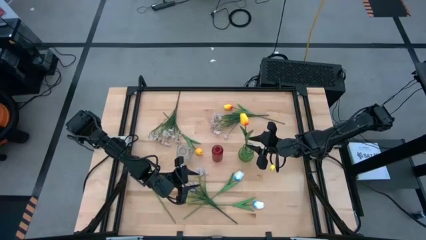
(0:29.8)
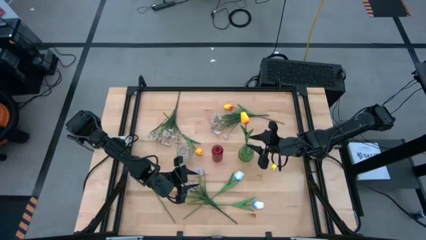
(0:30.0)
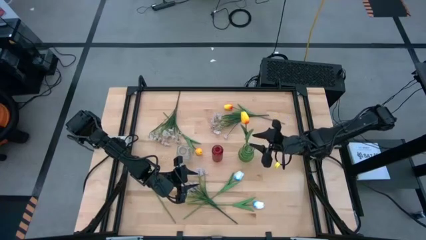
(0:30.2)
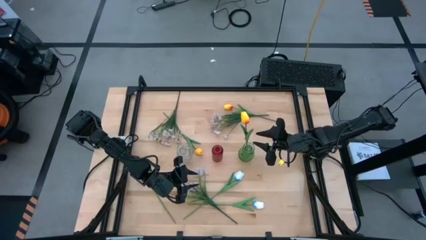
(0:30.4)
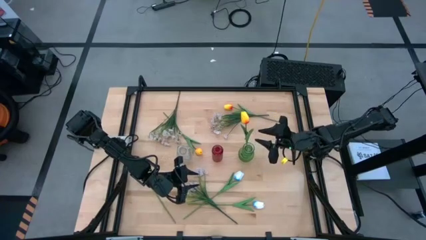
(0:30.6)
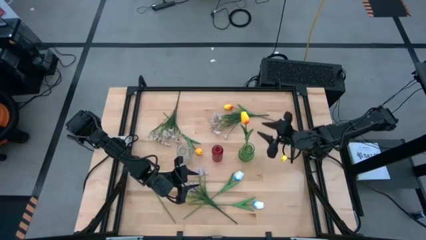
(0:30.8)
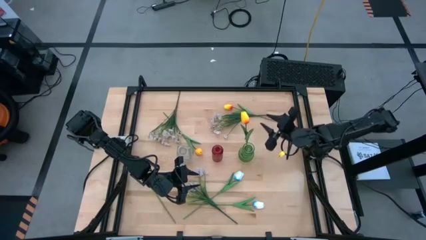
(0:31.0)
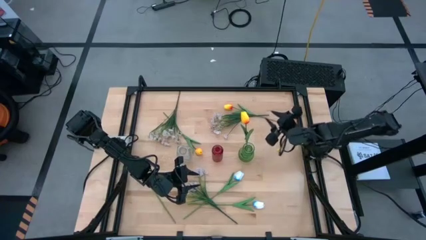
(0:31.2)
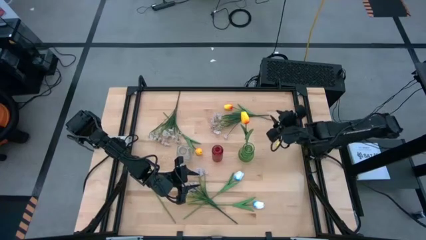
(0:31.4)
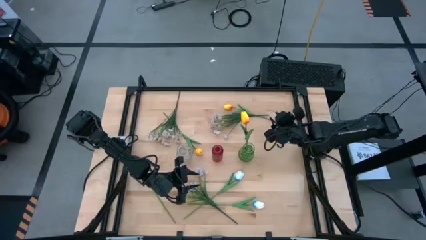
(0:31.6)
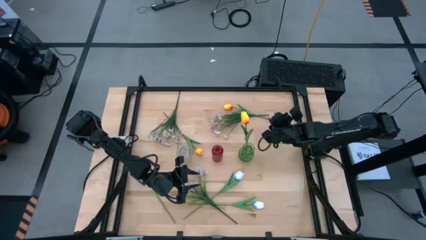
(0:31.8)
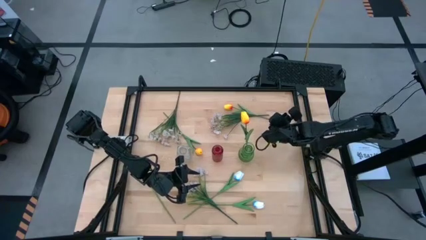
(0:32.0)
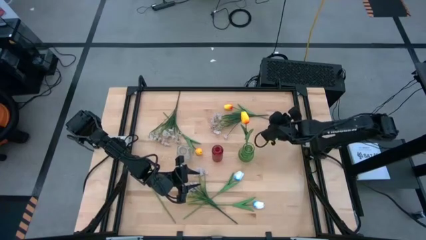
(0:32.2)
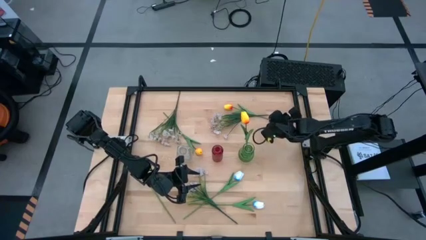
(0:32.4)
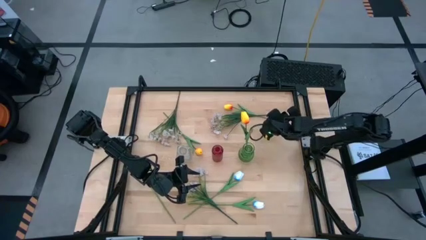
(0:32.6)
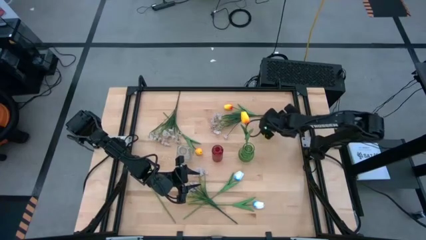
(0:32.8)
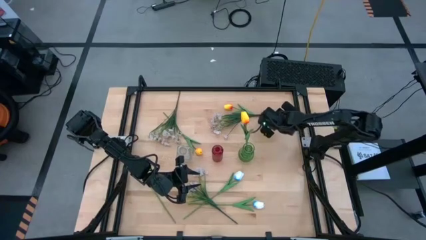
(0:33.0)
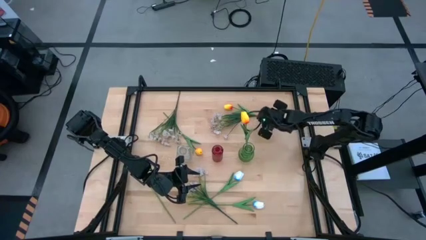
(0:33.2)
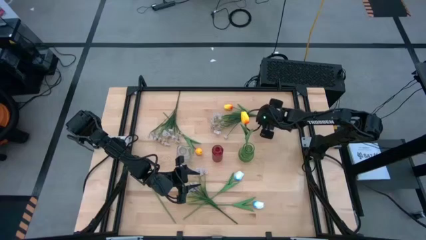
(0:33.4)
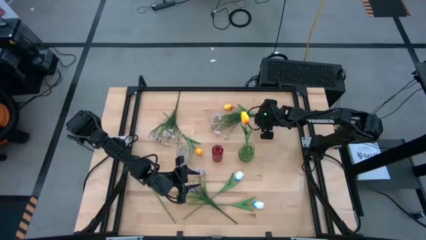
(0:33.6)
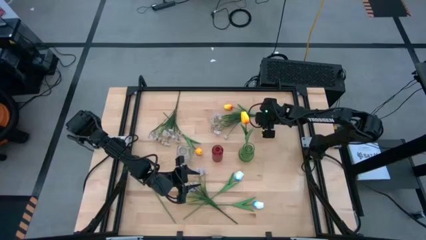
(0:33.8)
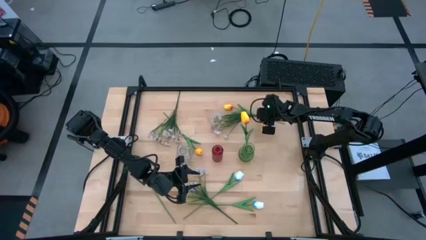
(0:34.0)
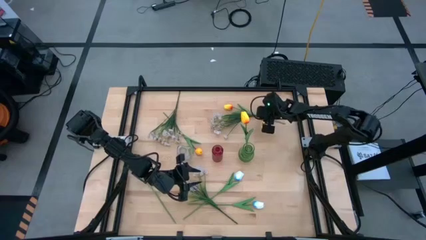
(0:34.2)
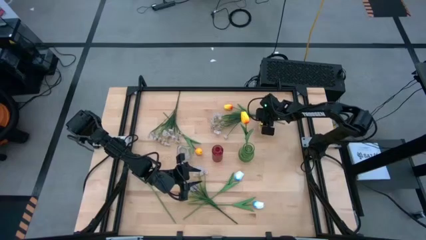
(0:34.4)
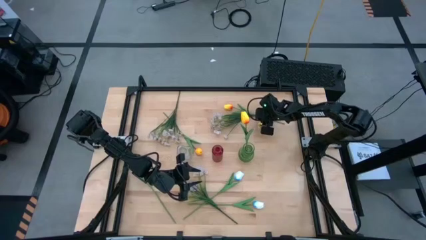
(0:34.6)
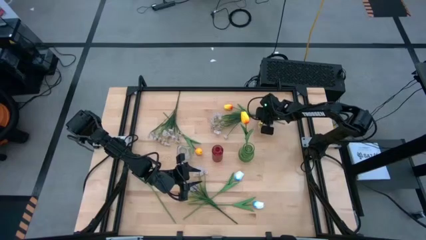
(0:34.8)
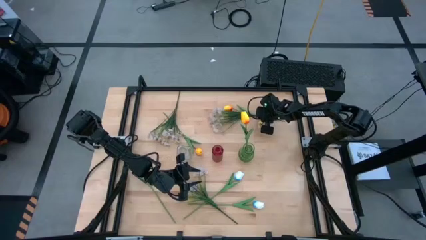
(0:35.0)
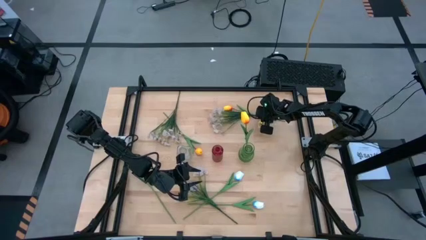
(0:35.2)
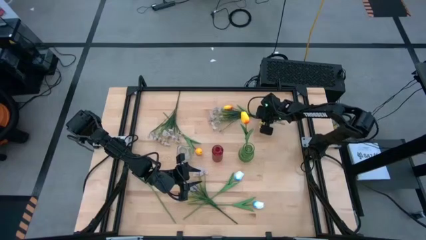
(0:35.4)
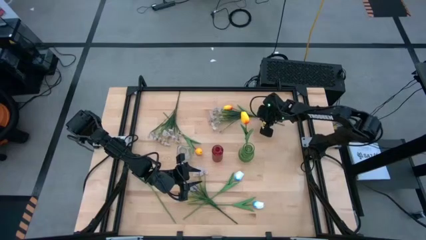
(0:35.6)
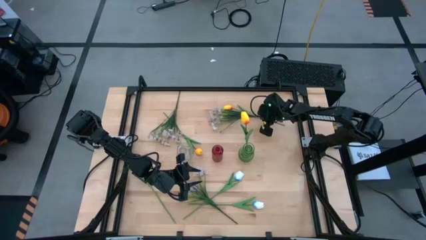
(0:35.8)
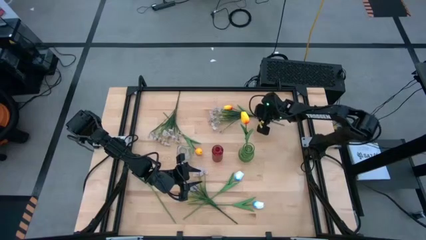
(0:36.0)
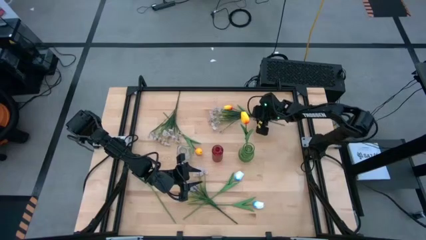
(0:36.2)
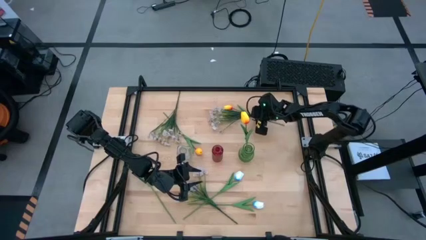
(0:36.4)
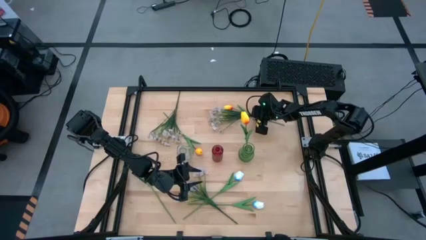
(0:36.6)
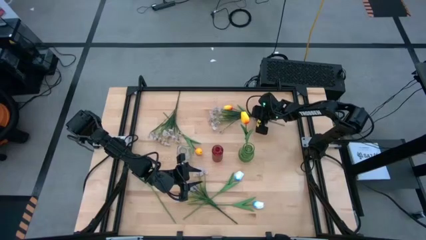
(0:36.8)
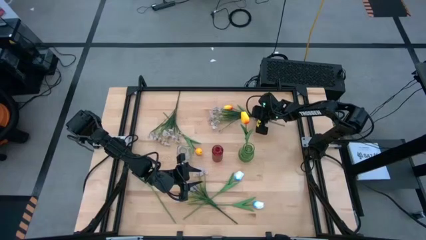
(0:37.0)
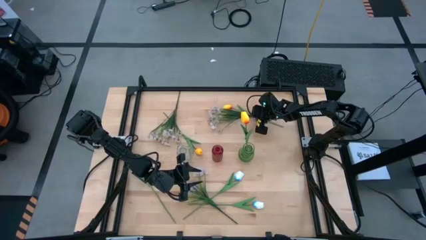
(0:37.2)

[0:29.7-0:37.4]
Task: Sort flowers into vase by color
Put the top right white flowers into the red vase

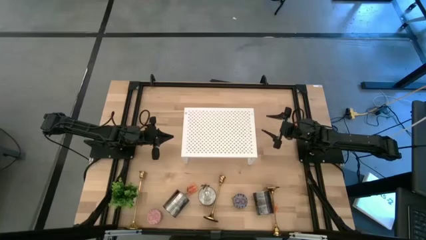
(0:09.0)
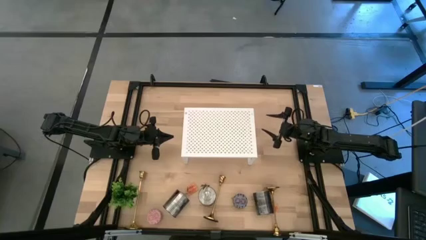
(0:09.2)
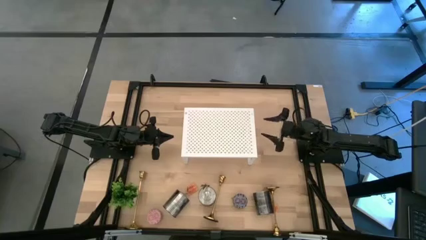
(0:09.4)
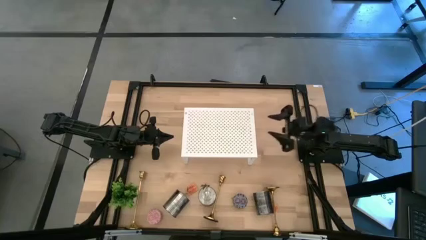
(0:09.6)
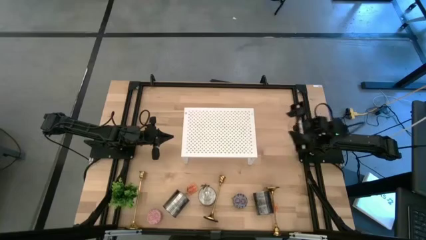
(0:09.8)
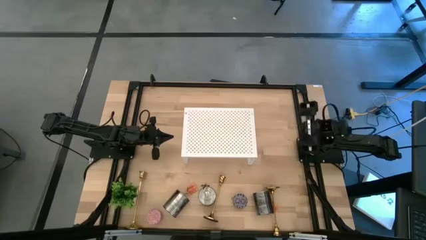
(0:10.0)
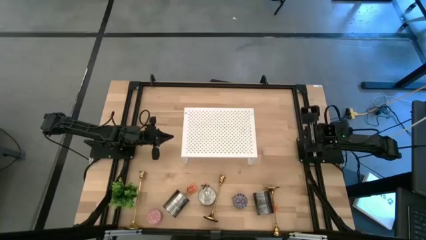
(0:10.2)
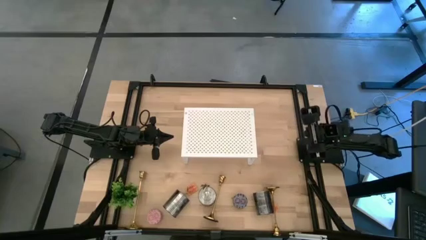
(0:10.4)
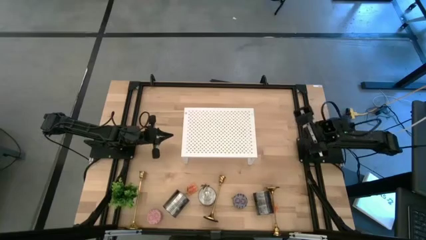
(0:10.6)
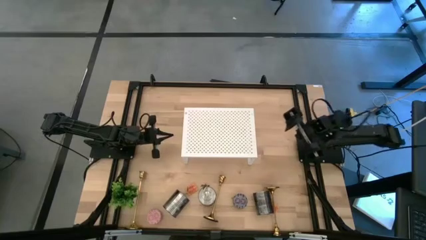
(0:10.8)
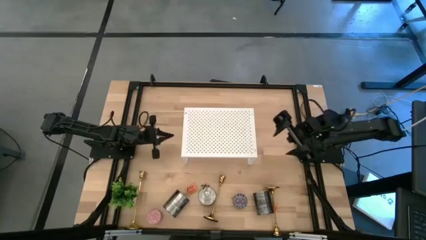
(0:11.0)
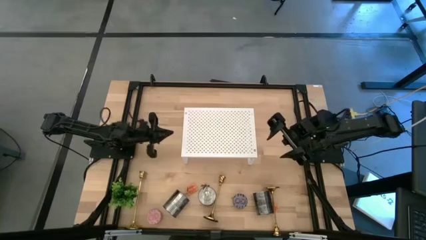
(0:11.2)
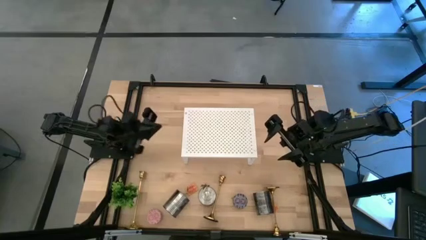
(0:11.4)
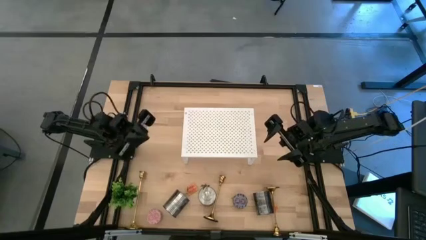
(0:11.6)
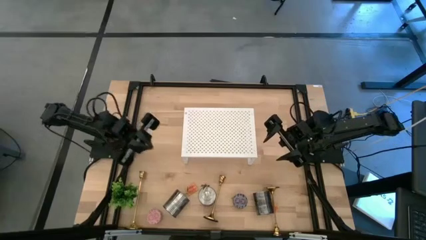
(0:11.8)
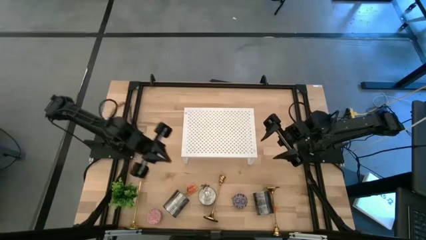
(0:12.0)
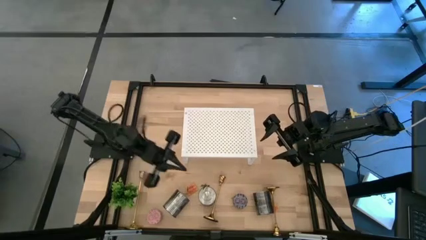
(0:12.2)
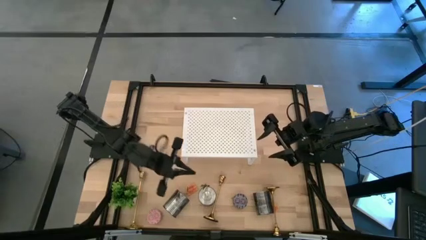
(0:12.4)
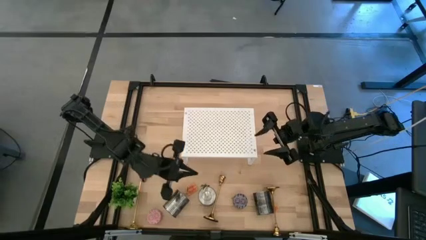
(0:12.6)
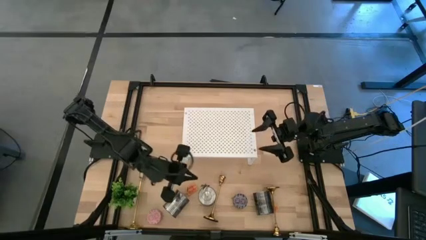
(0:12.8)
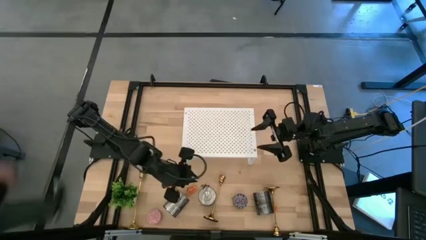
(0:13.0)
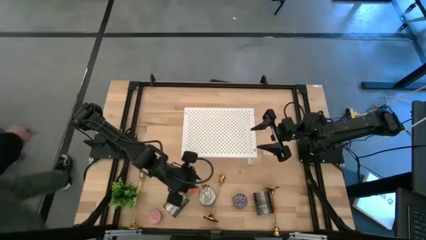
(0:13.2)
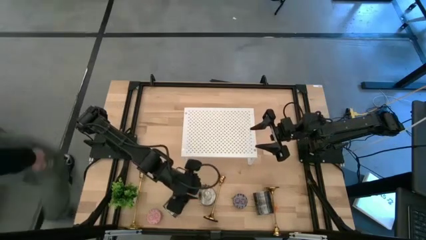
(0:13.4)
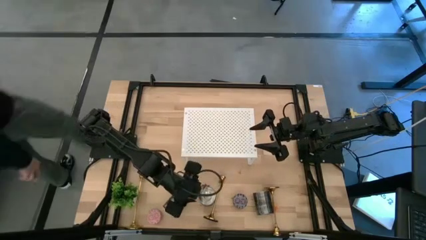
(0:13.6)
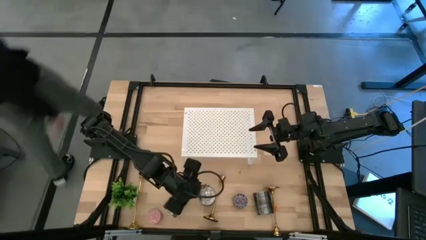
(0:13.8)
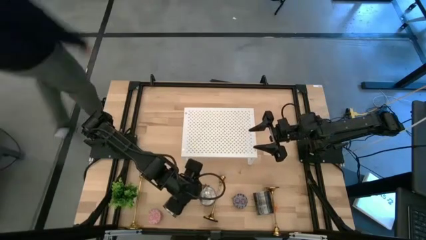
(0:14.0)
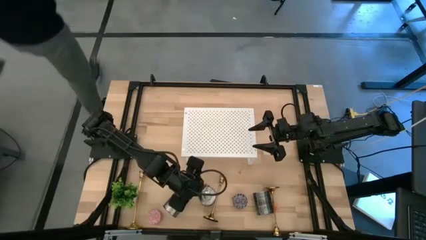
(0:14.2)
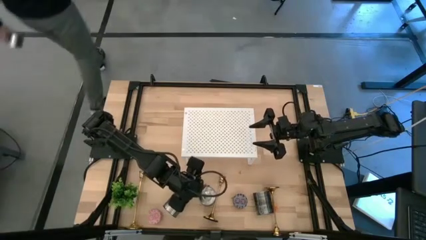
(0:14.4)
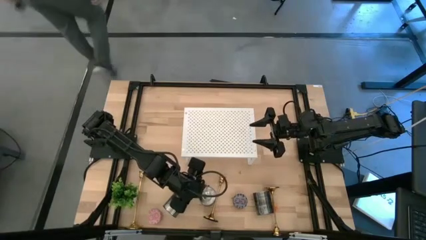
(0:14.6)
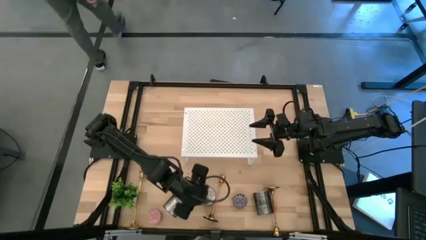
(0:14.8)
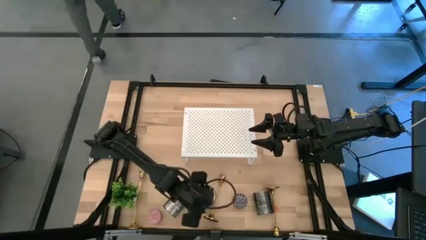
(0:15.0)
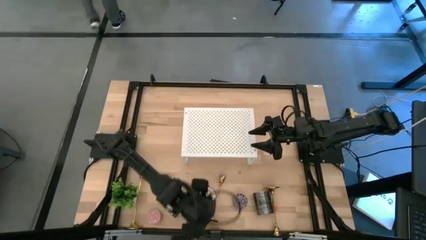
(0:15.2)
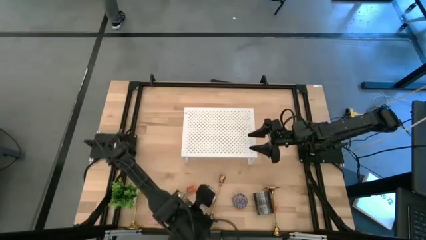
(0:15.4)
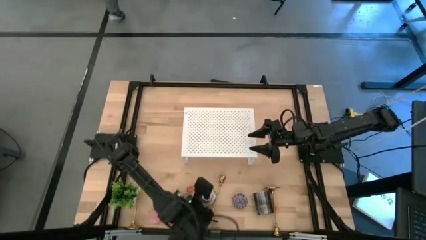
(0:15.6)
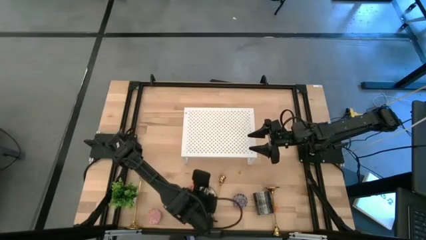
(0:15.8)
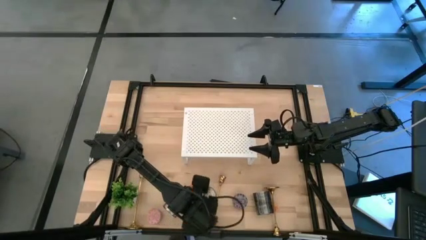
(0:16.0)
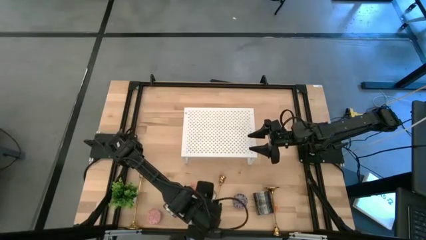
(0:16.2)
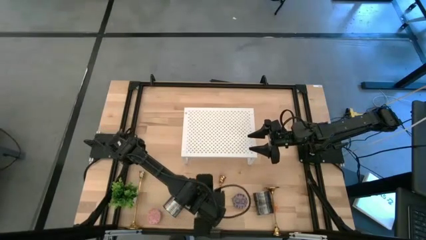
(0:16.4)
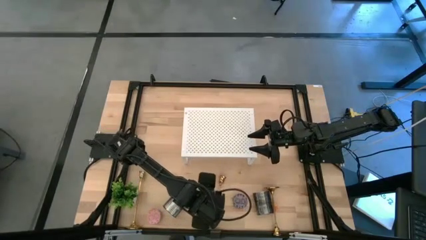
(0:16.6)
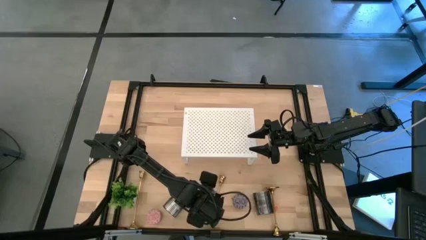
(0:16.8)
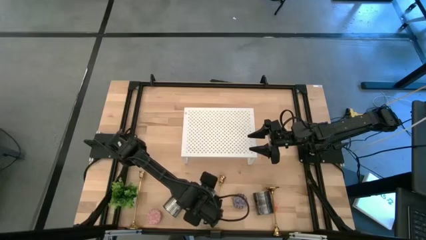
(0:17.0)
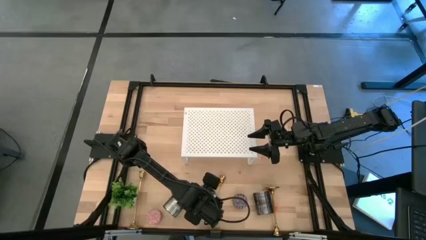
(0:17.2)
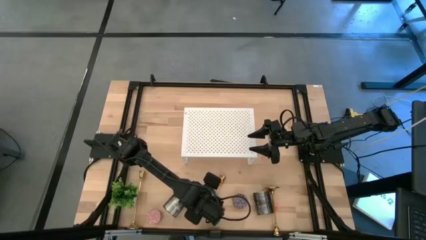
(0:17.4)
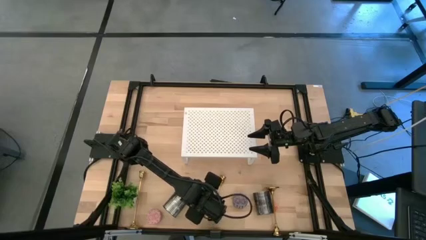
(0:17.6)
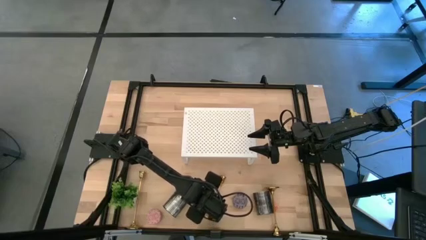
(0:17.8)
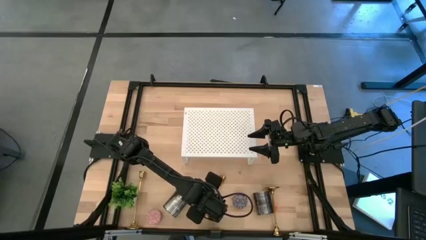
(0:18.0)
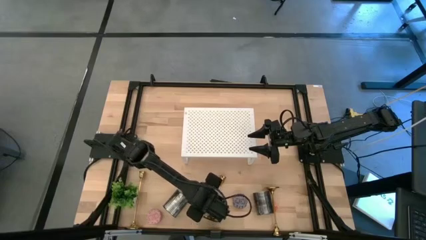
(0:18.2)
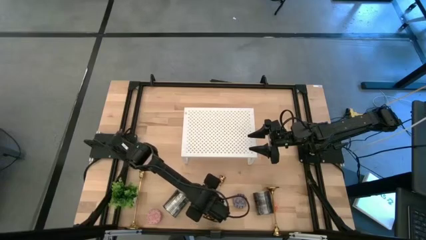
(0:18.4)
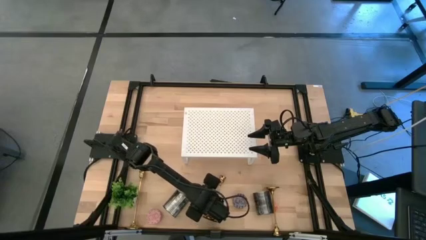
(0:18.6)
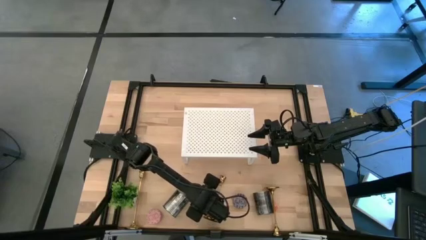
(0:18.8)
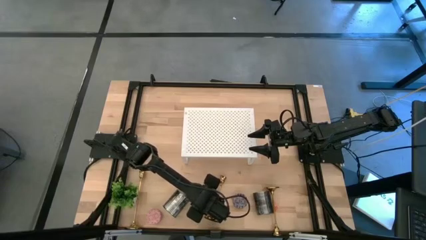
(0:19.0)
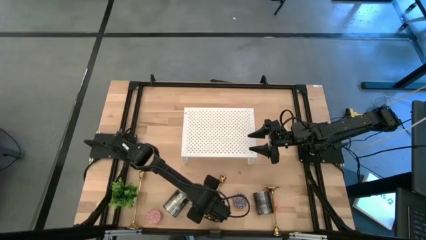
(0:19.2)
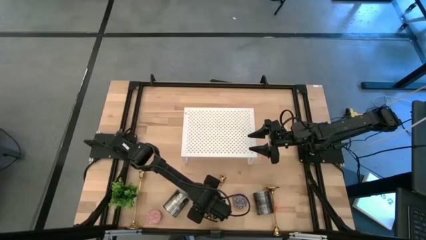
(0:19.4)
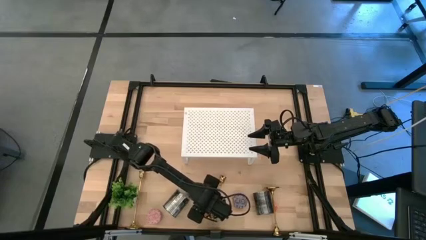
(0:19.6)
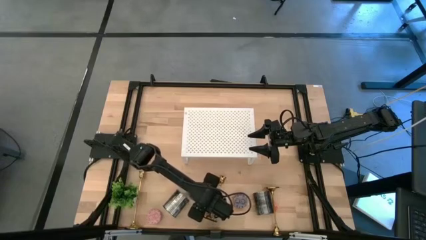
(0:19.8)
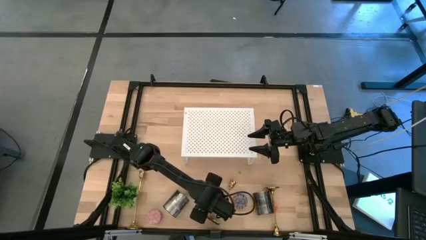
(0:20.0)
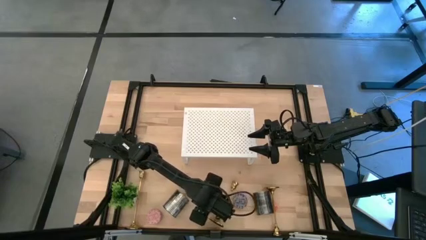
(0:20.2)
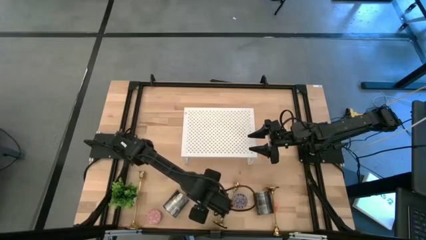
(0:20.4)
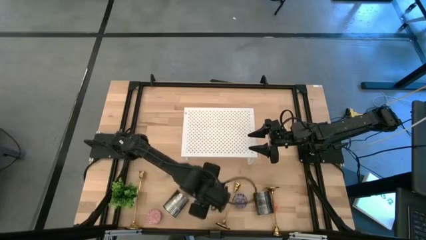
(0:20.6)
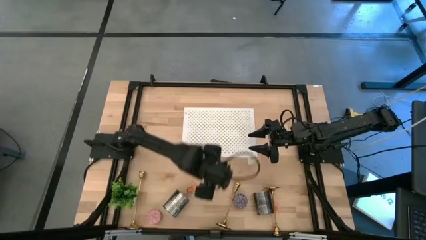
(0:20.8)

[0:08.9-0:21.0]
Task: Pick & Place candle stick holders
Put the middle big silver scented candle on the shelf
